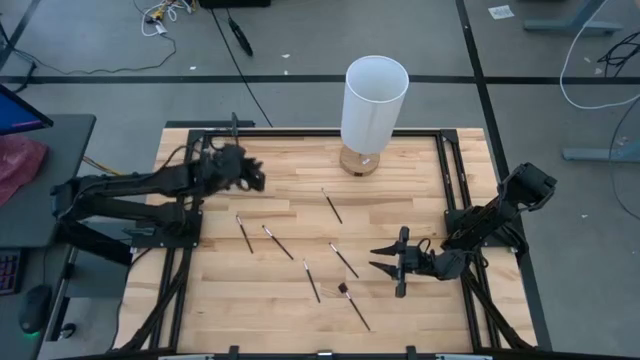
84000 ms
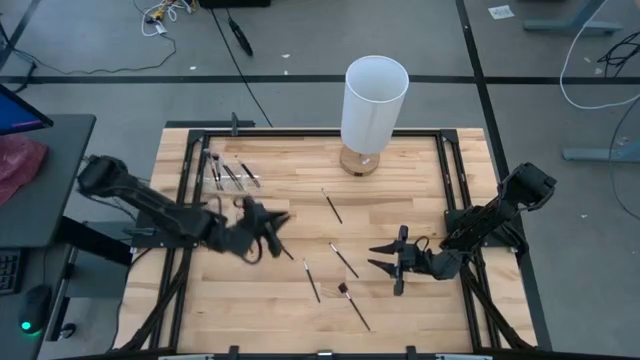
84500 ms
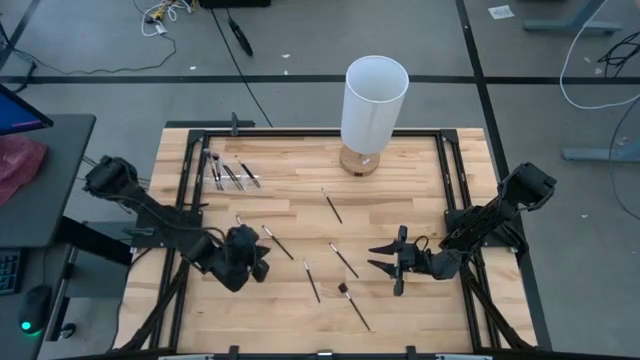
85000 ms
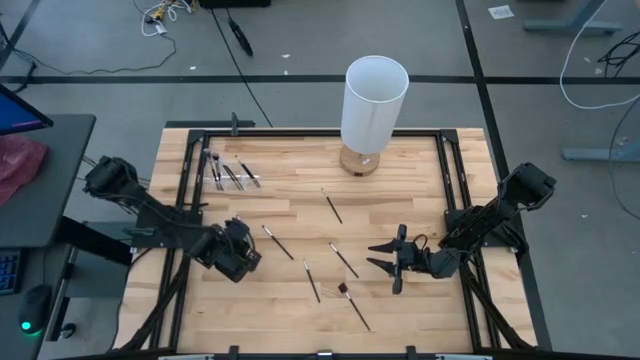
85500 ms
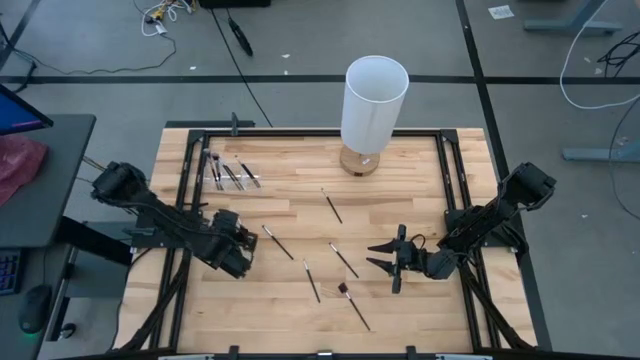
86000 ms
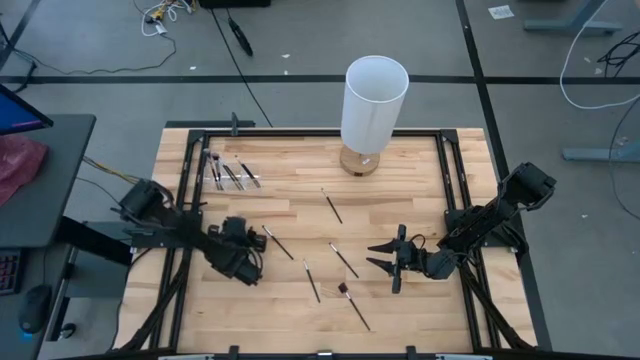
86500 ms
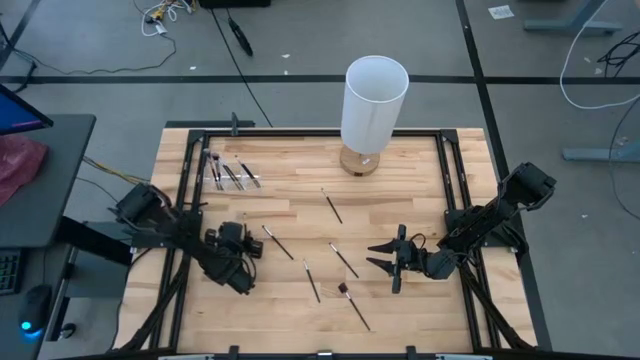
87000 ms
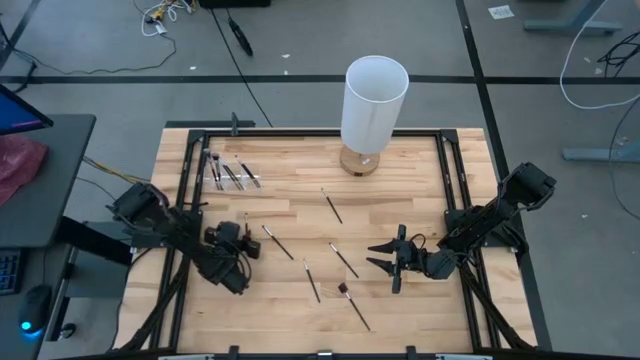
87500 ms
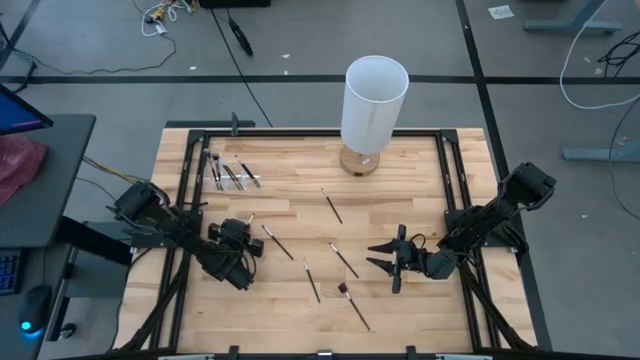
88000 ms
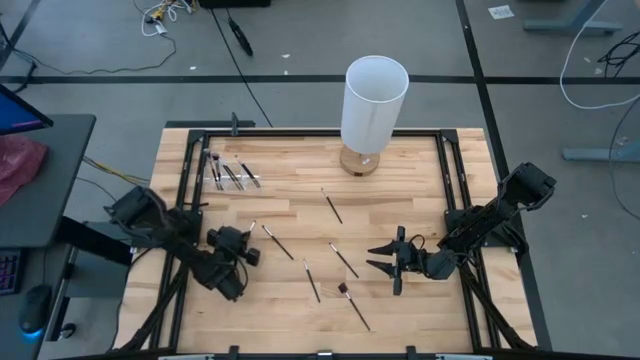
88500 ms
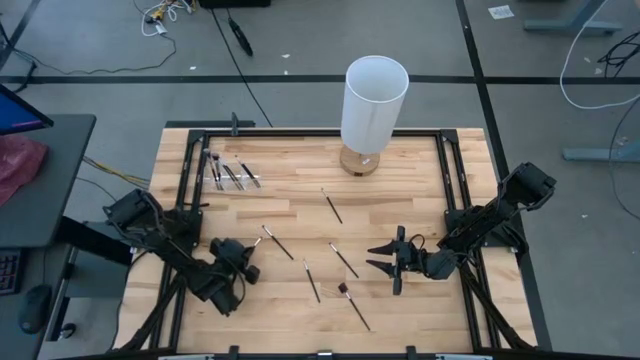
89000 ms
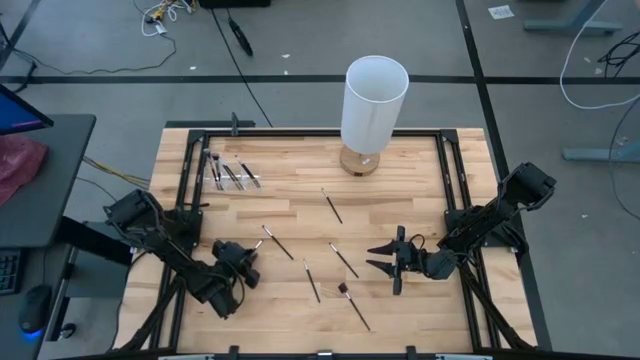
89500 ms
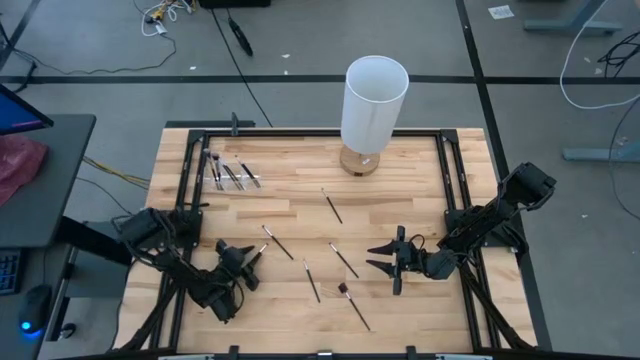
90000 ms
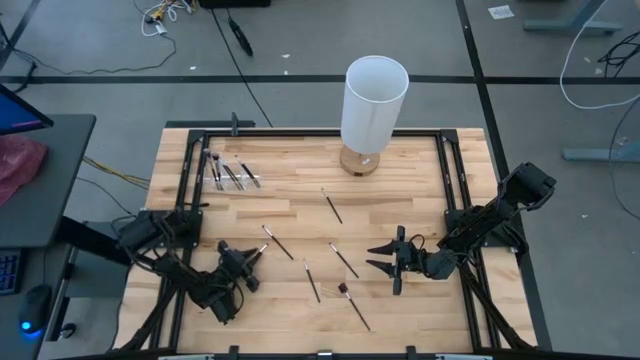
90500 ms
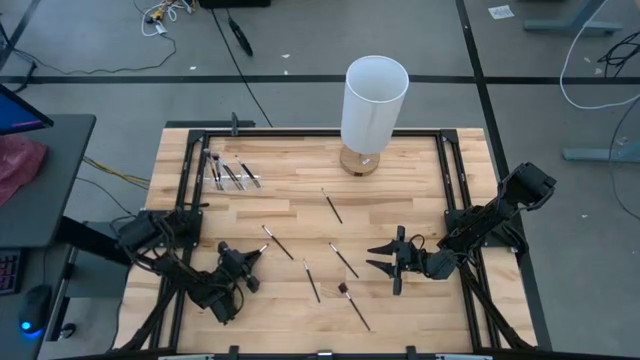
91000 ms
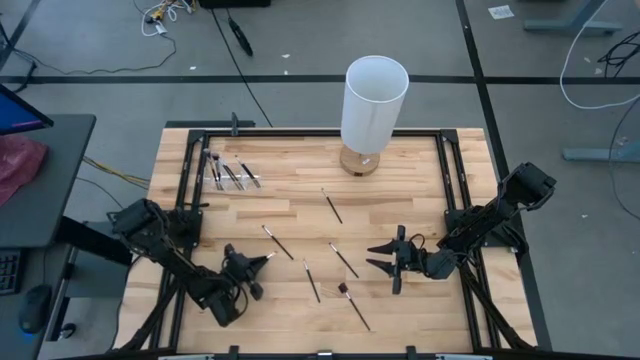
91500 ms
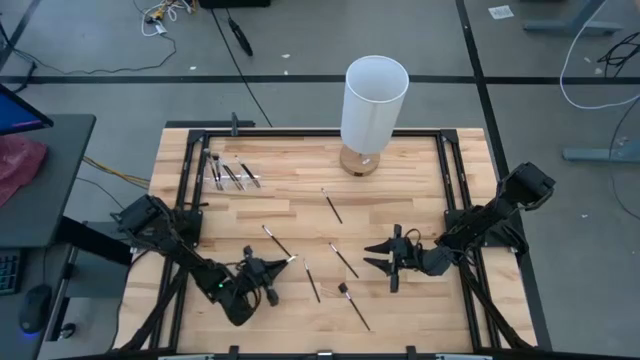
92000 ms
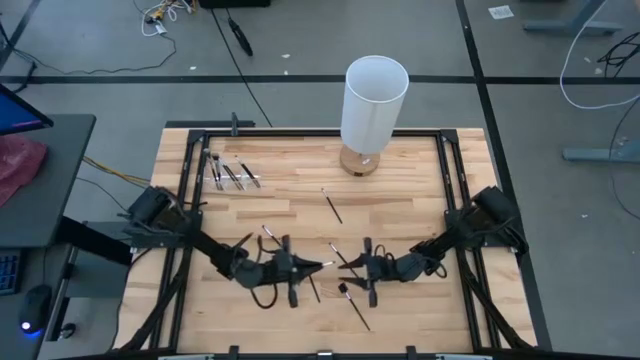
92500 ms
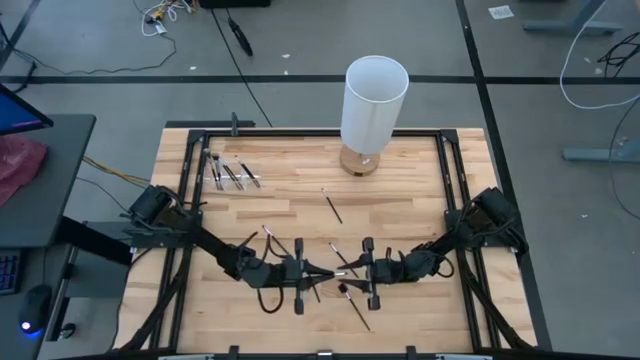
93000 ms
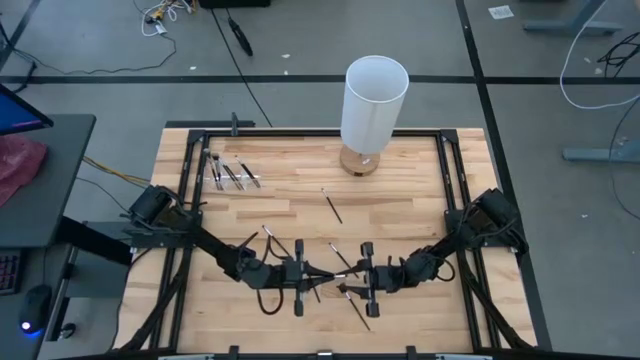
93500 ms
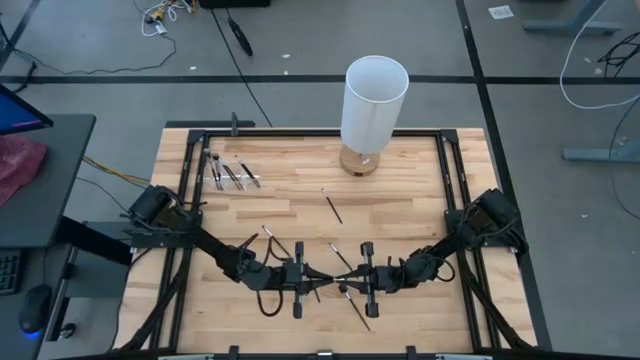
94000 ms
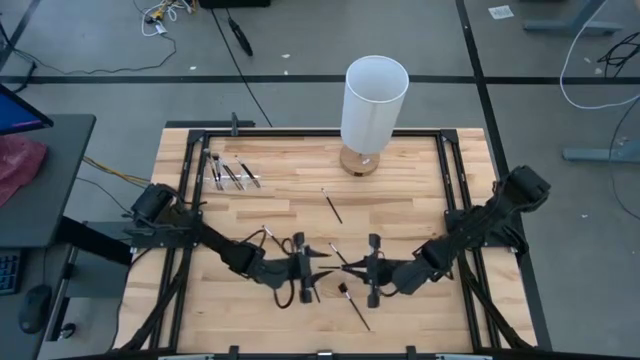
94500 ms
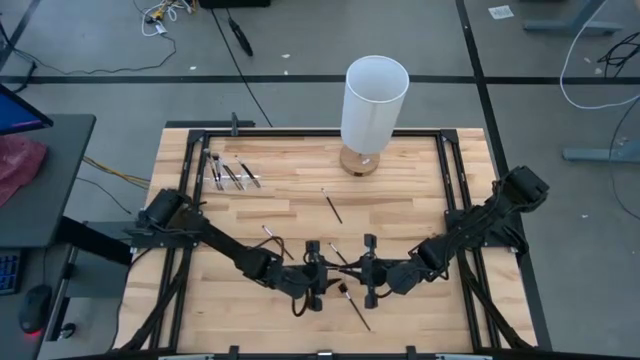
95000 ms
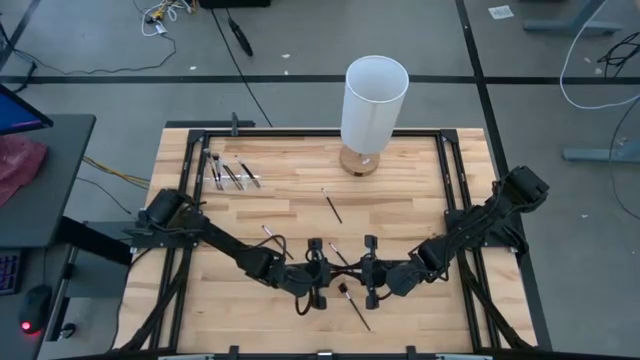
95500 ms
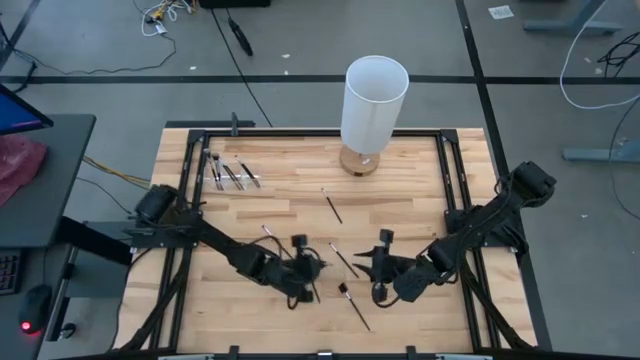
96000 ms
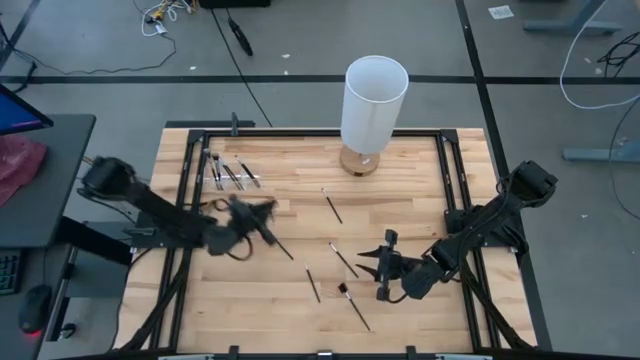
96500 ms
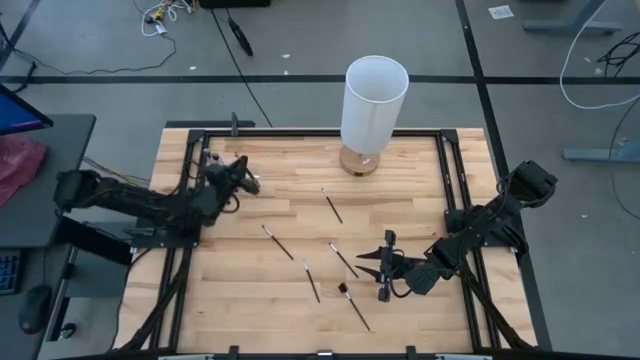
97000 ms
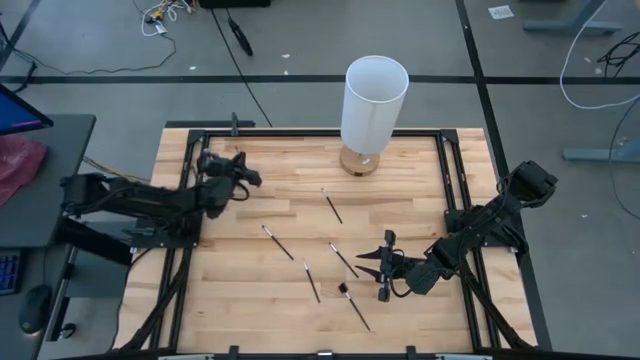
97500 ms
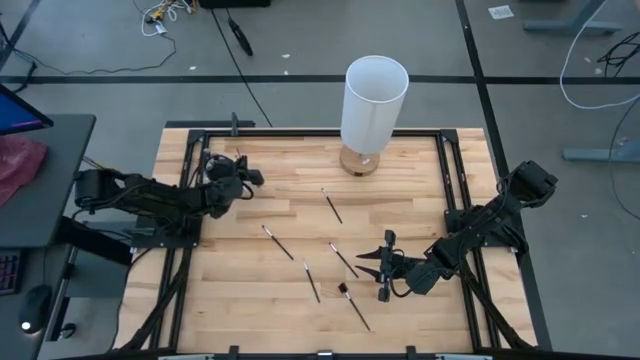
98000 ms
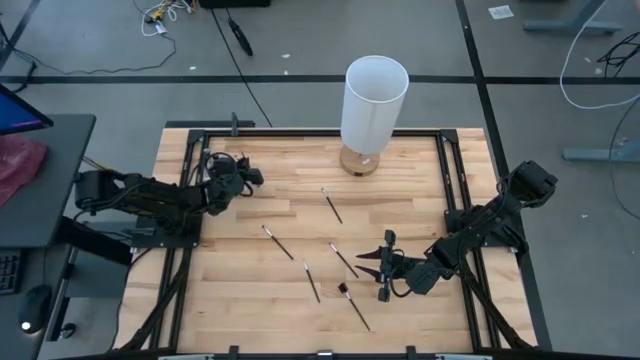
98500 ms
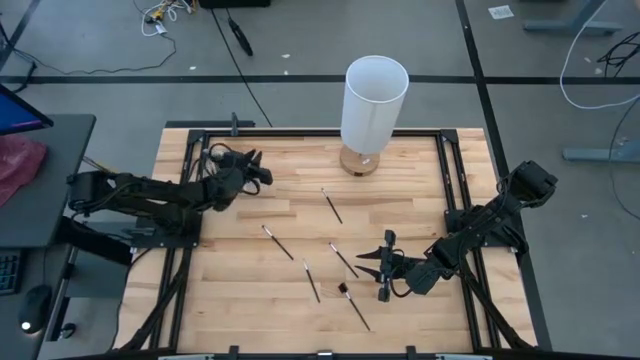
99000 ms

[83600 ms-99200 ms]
Task: Put items in baskets/containers
Put the black eyeshadow brush into the transparent organizer

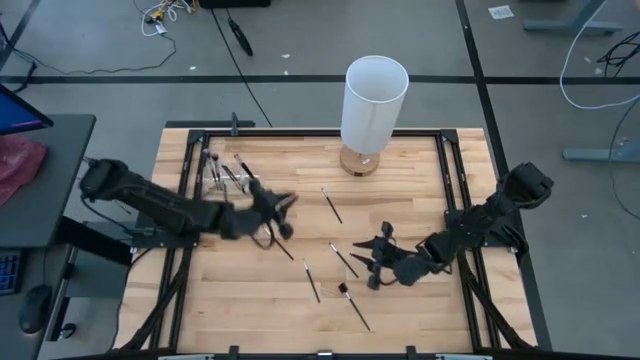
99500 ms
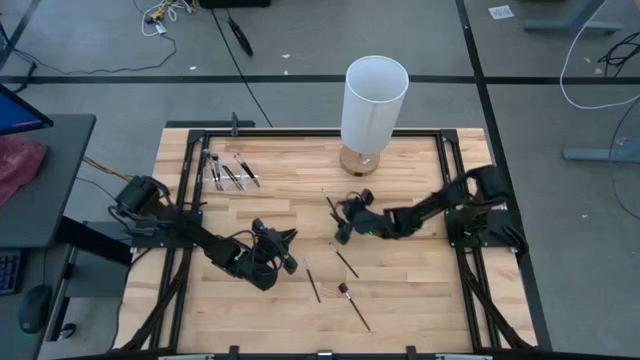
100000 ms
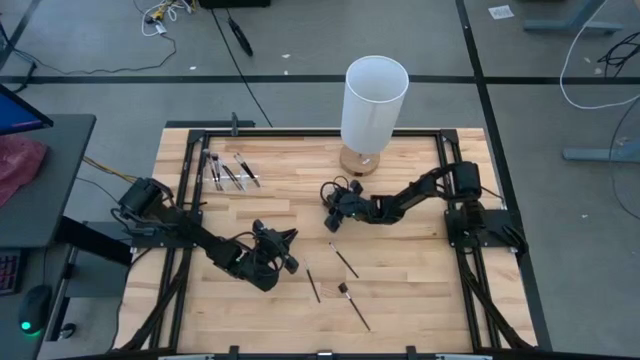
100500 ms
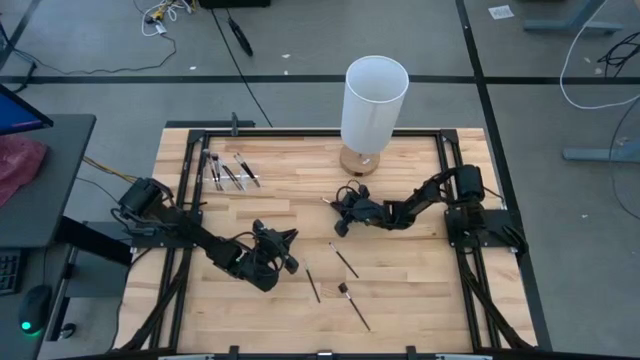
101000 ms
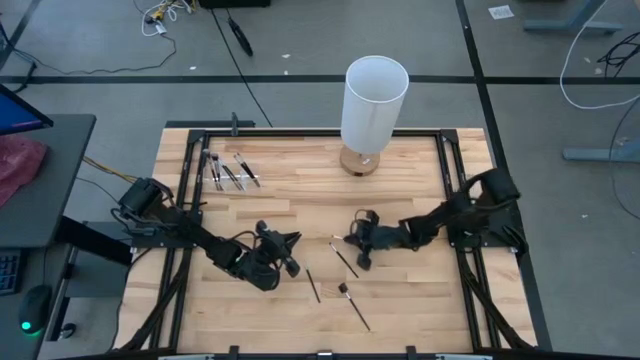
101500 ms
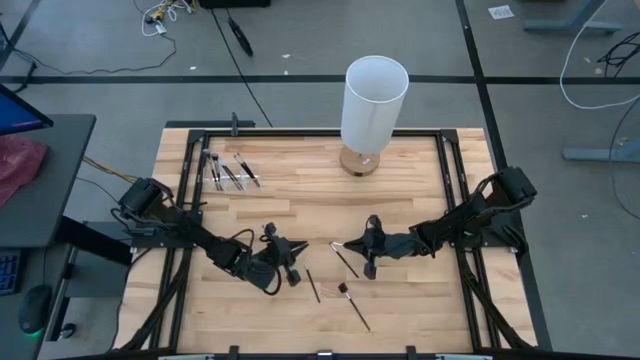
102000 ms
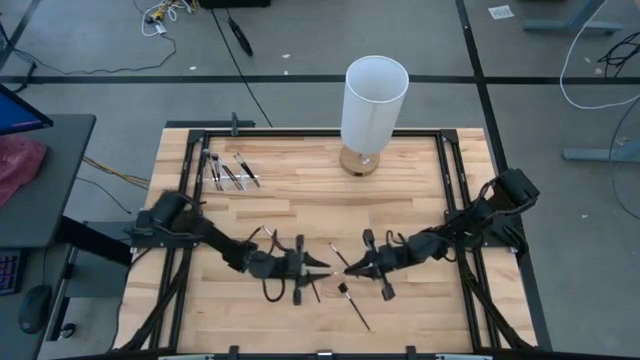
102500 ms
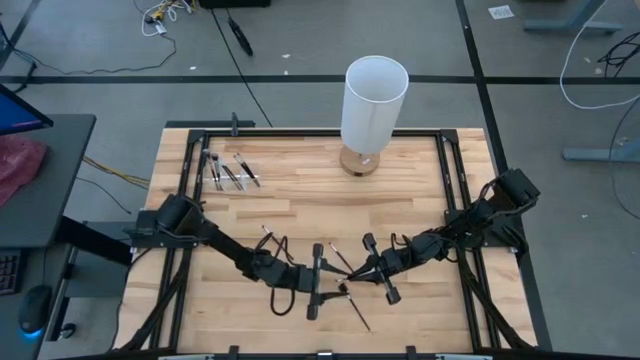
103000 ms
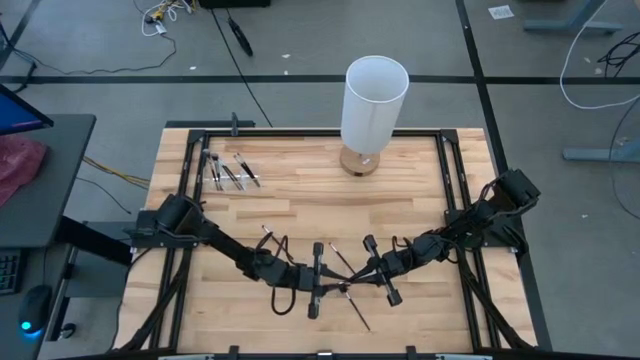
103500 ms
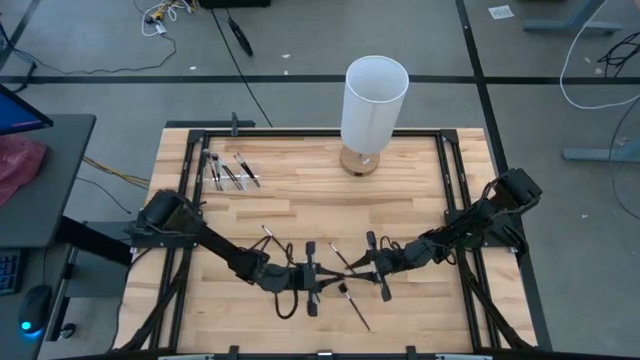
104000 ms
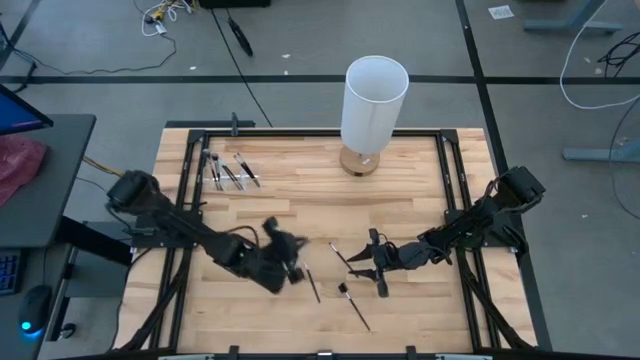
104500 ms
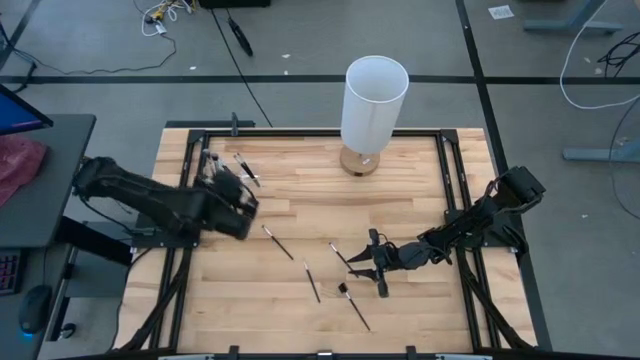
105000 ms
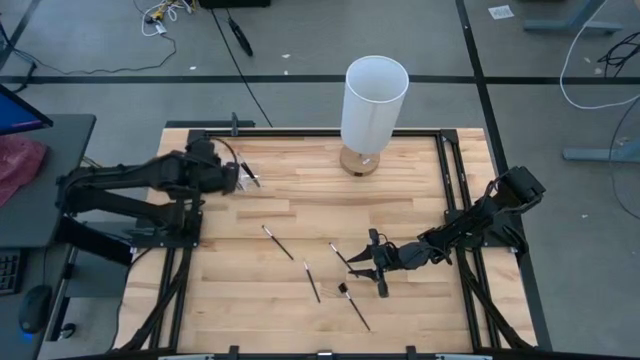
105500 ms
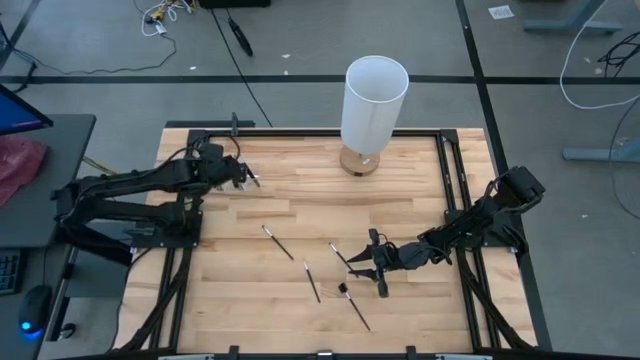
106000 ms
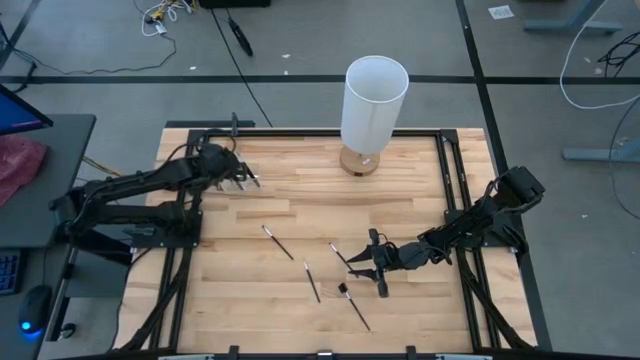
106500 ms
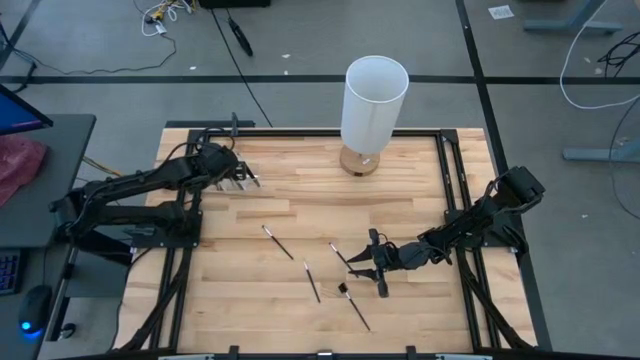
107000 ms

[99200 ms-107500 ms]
Put the black eyeshadow brush into the transparent organizer
